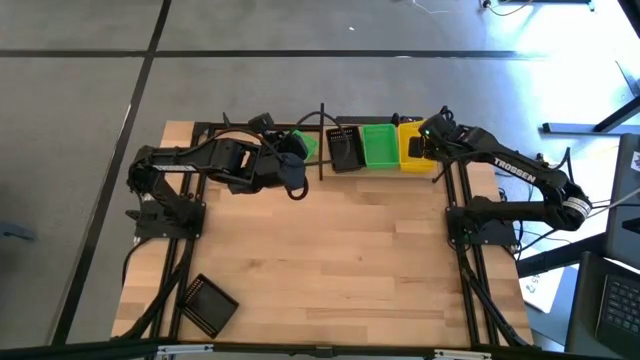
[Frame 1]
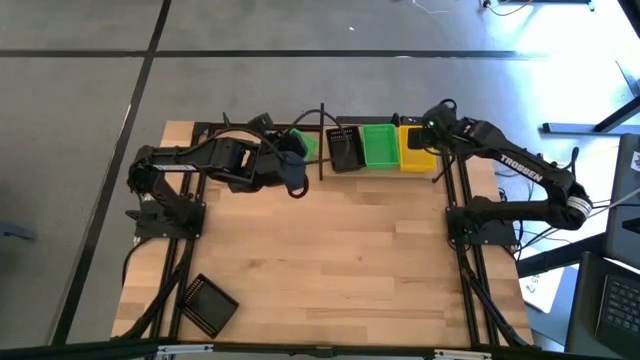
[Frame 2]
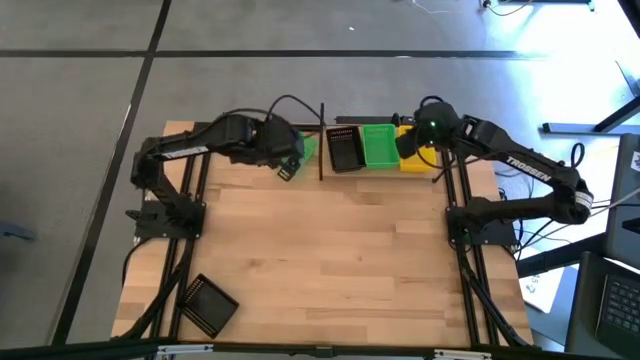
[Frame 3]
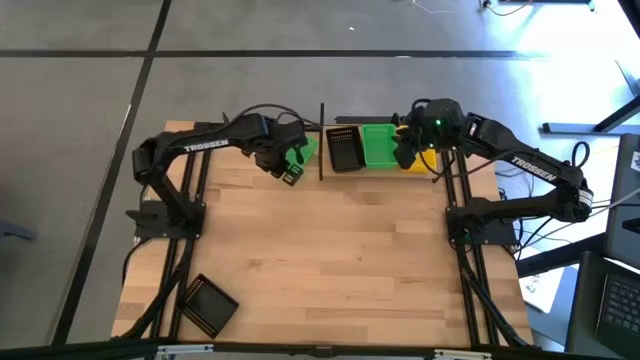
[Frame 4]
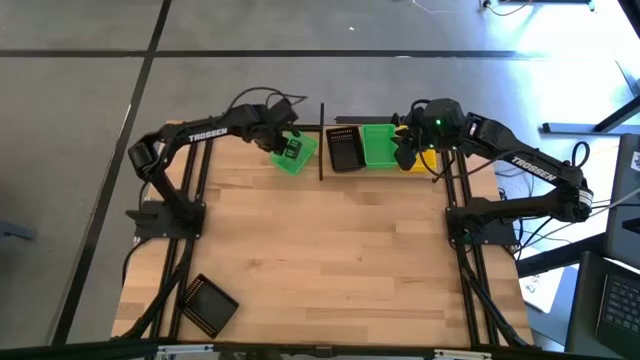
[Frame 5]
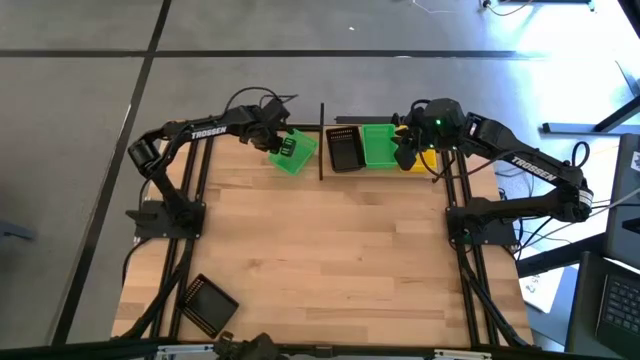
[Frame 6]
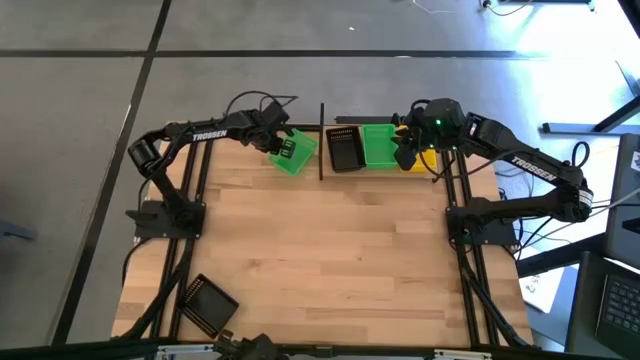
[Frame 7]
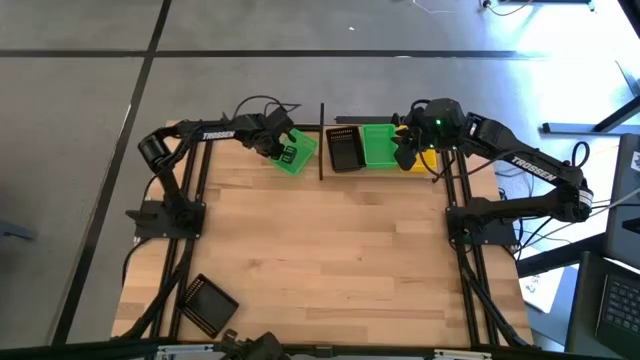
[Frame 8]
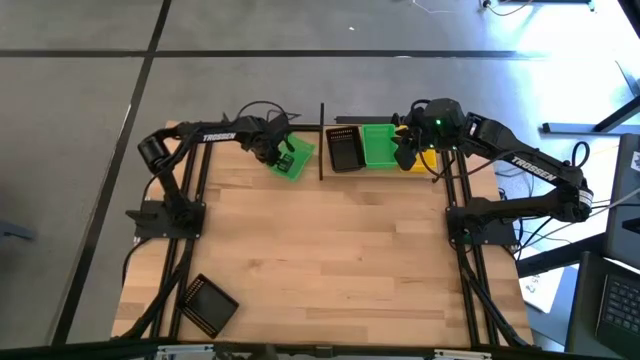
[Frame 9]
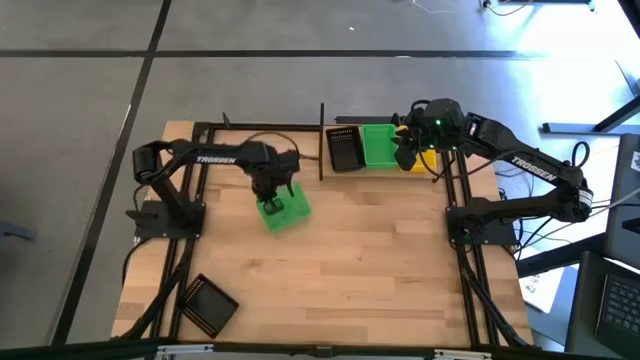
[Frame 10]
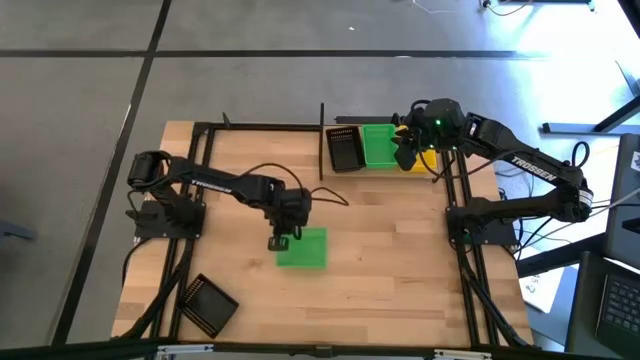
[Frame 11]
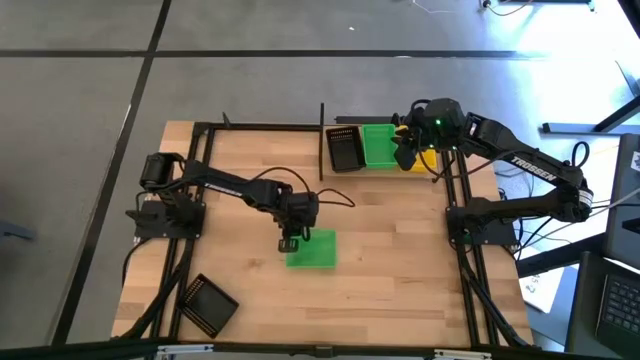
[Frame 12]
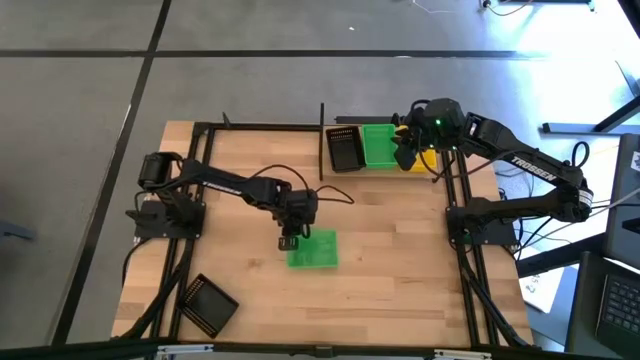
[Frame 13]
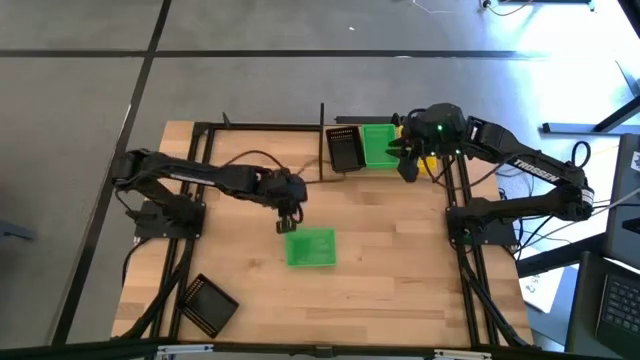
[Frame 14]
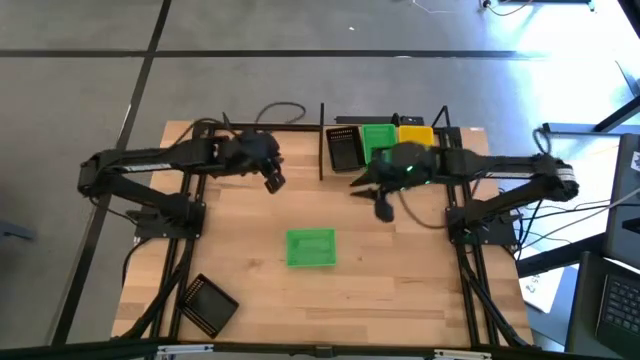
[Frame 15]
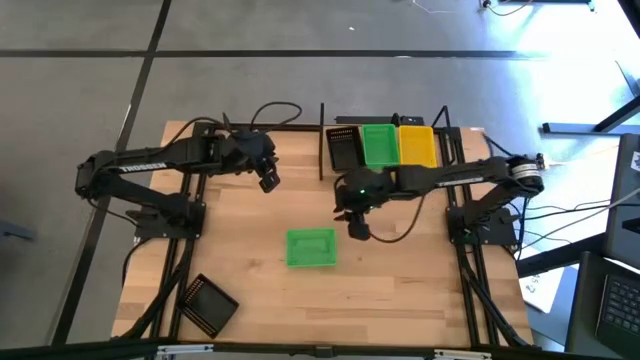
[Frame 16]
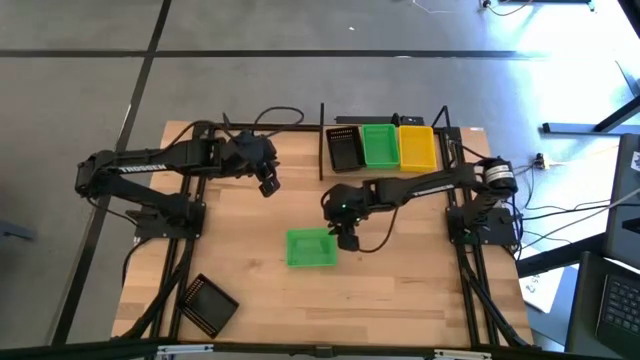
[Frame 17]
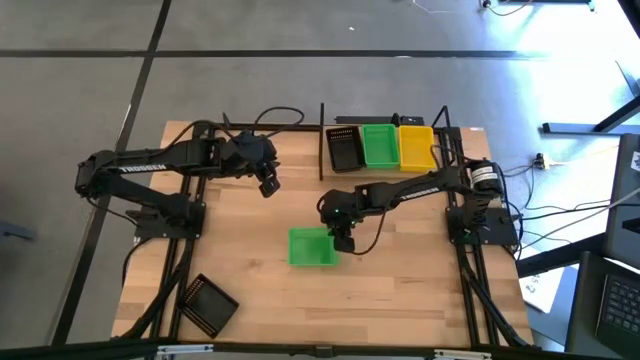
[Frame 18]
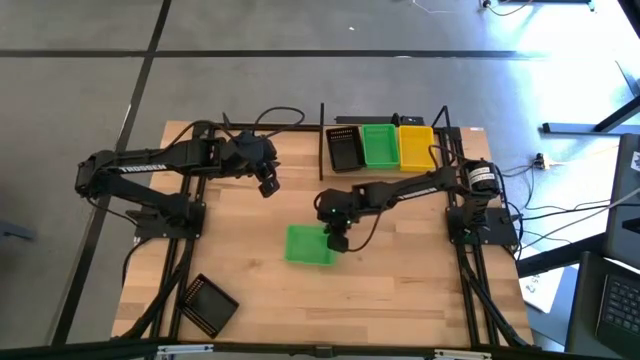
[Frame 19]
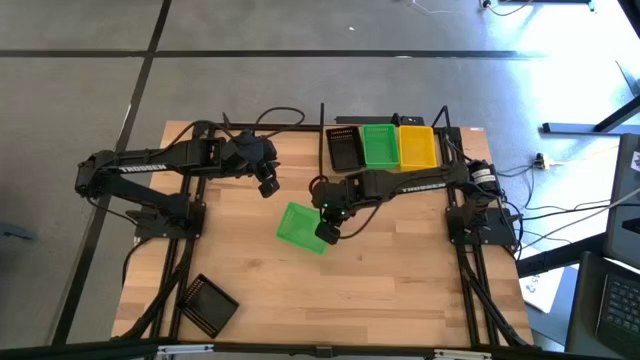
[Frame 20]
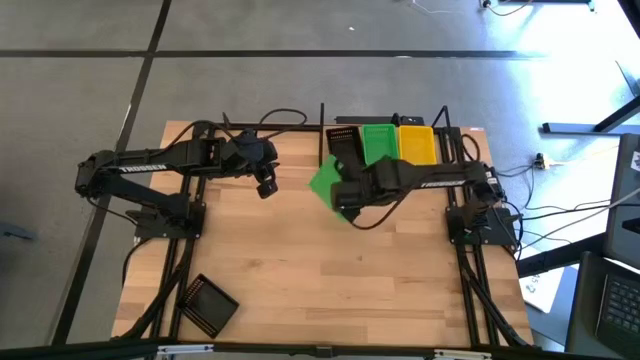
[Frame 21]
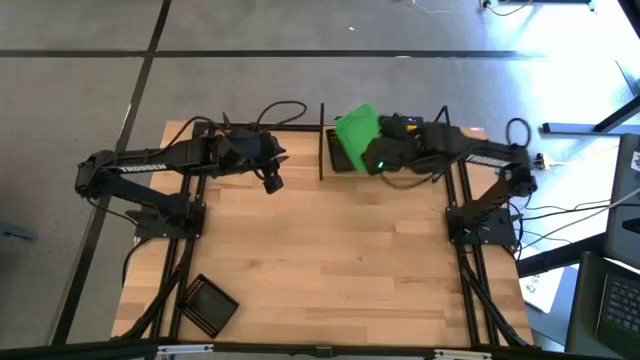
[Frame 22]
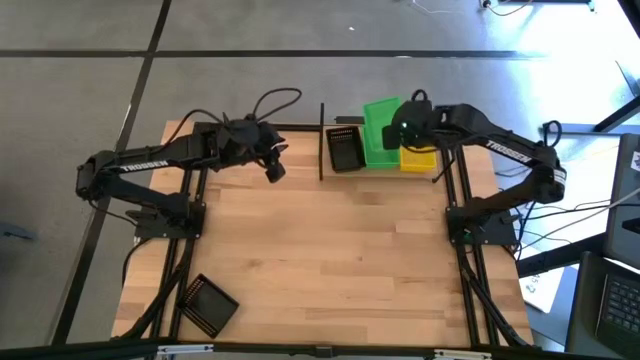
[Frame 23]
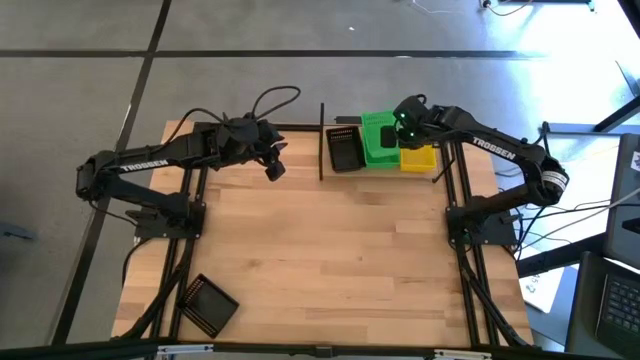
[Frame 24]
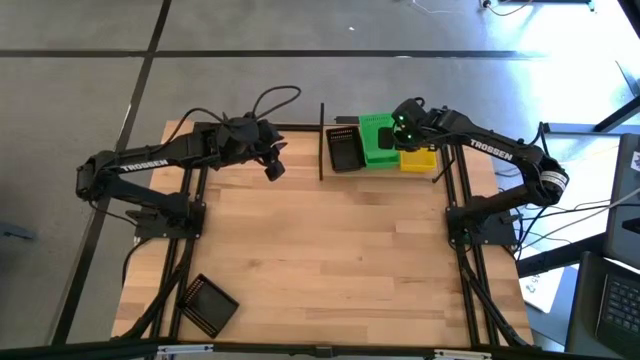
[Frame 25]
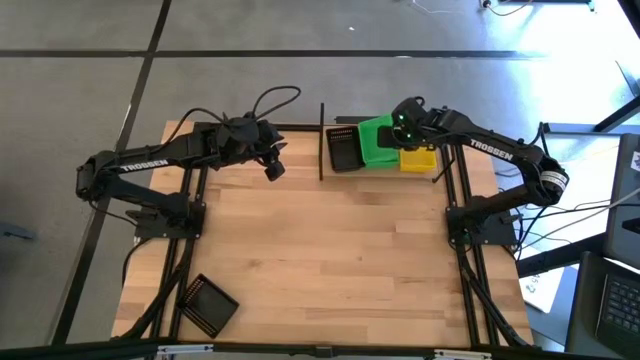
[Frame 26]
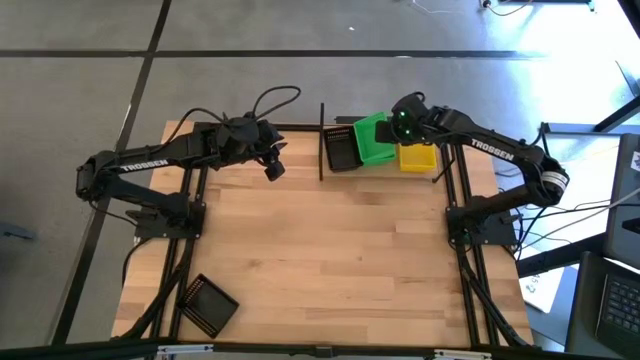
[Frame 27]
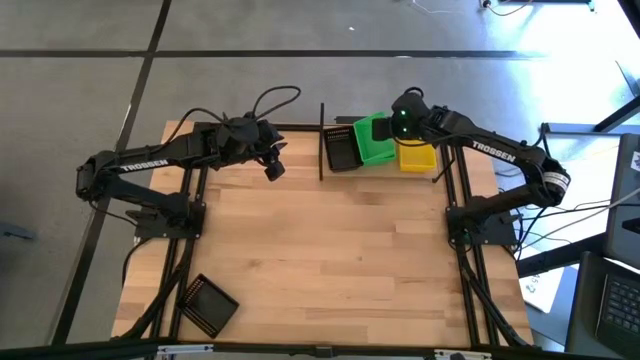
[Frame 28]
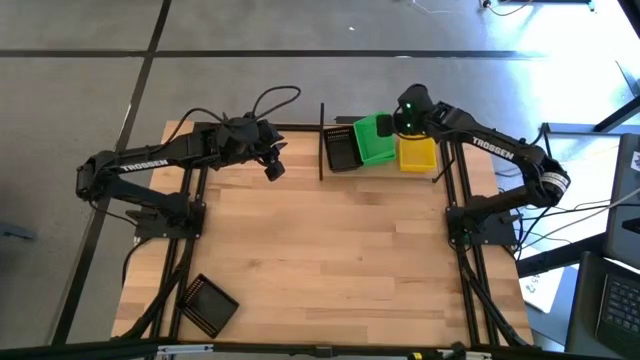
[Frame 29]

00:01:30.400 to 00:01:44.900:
Task: Stack baskets on shelf by color
Stack the green basket on the green baskets on the shelf

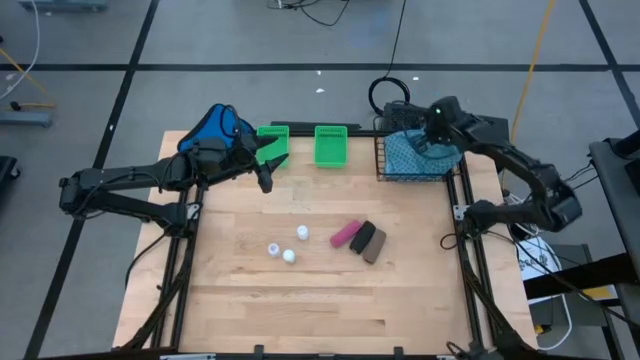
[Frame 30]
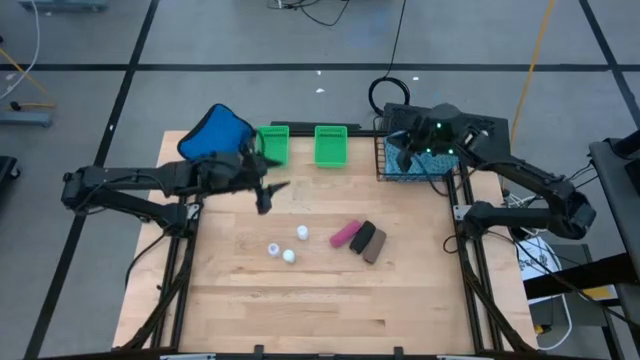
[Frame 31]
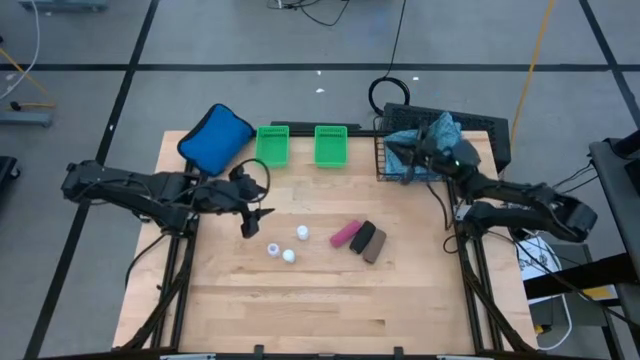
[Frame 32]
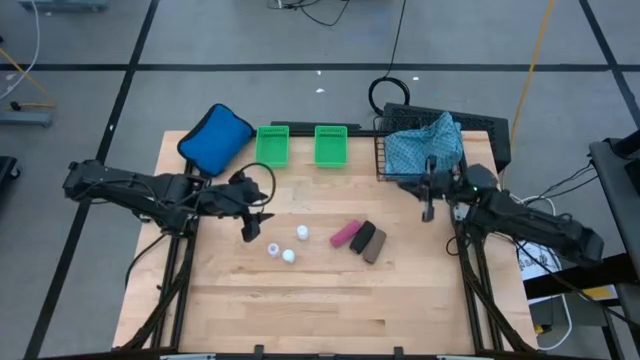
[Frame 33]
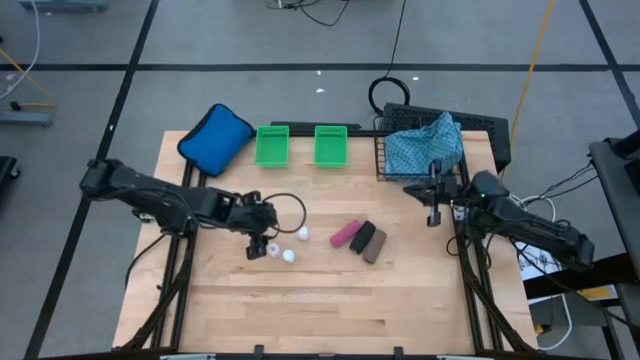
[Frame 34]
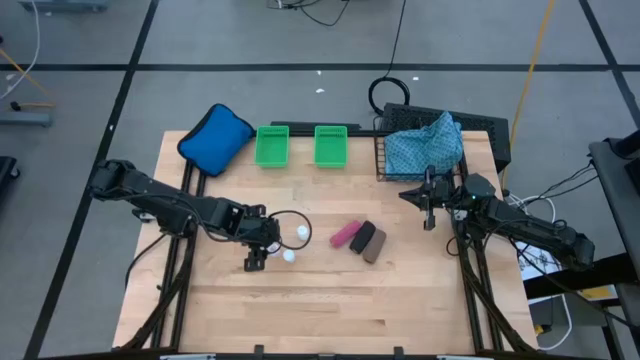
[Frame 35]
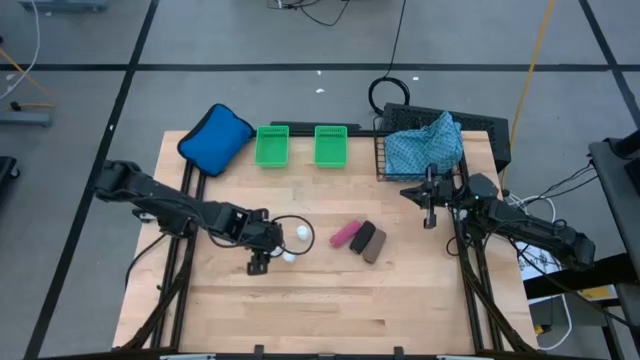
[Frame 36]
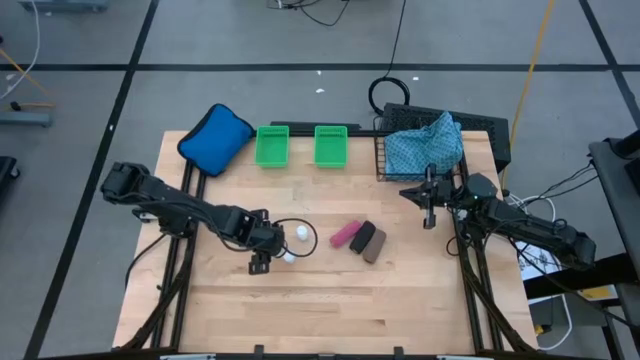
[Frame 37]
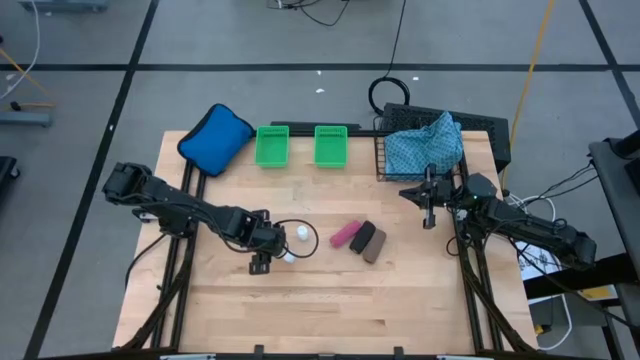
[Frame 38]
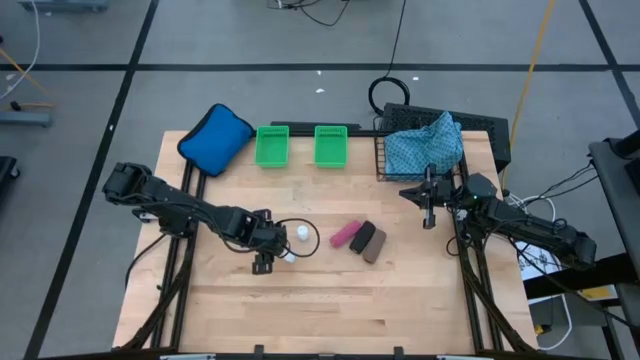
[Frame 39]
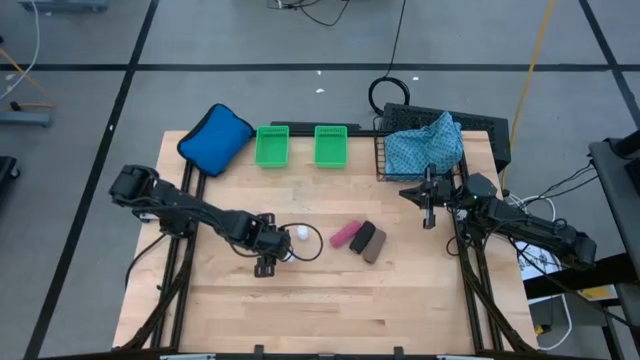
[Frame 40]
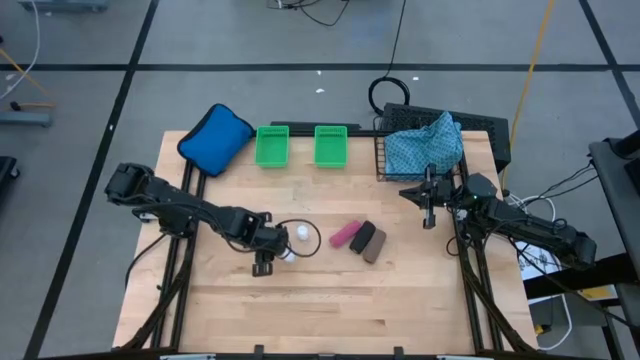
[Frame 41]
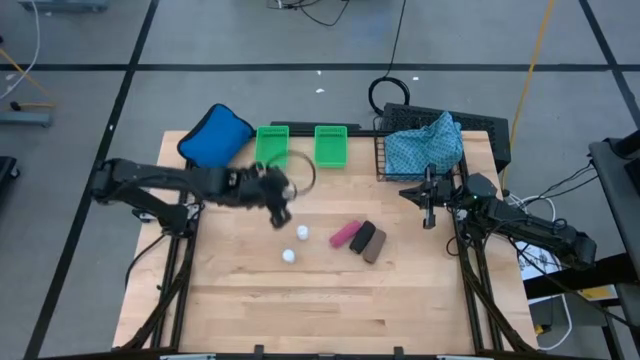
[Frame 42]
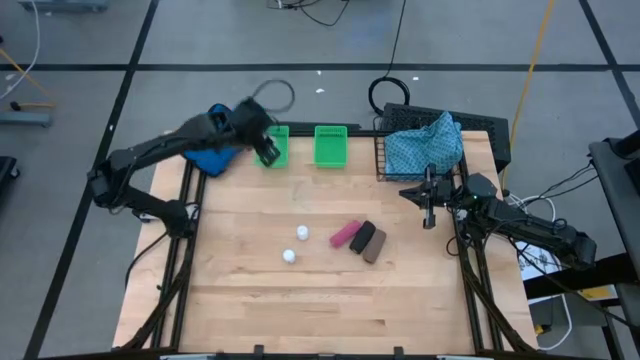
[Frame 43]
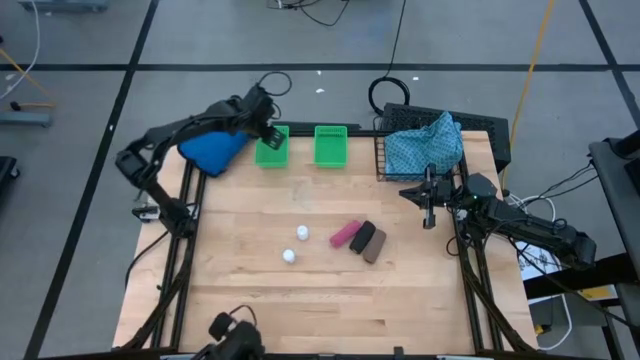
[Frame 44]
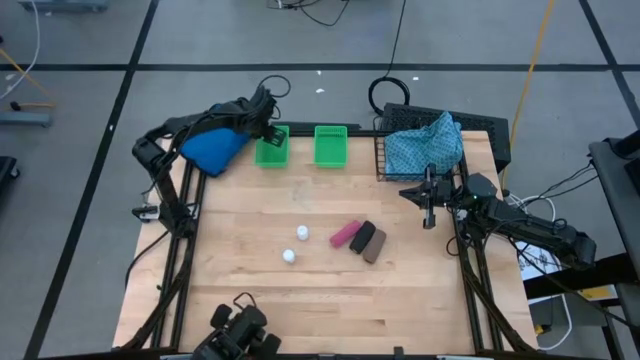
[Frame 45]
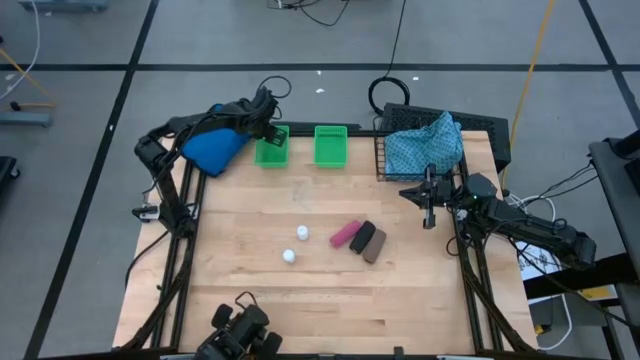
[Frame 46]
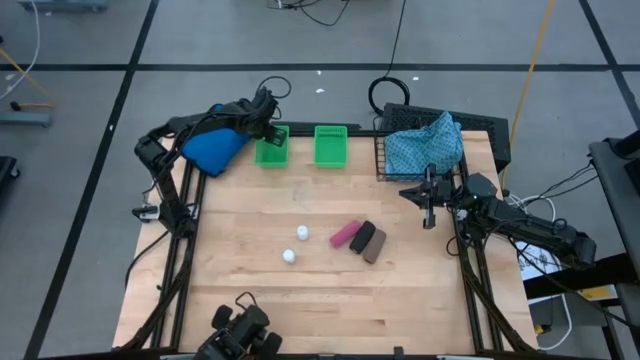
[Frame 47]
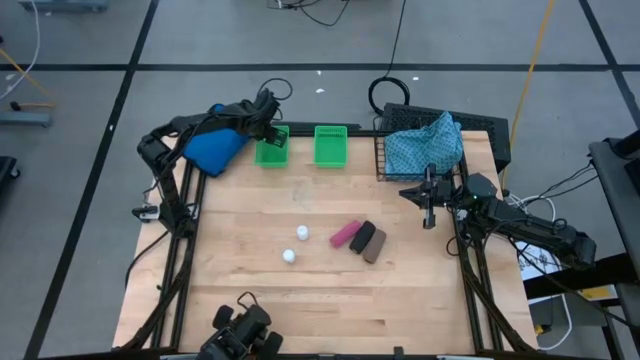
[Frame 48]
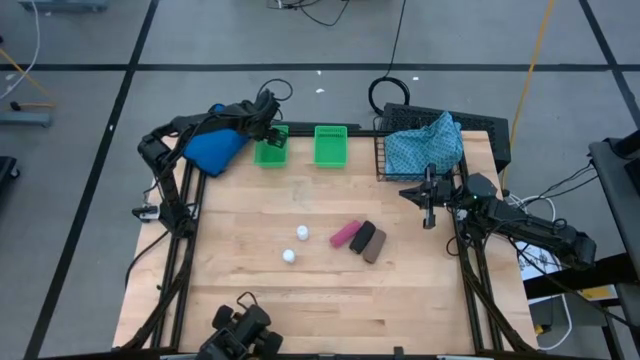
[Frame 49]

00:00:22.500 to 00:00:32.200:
Task: Pick & place medical supplies in basket/bin
Put the left transparent pill bottle into the left green bin
